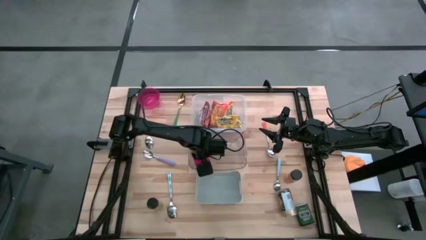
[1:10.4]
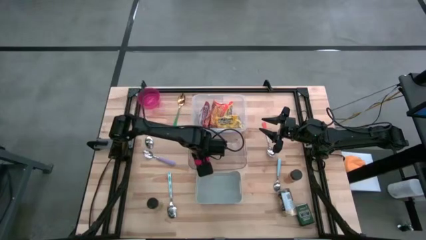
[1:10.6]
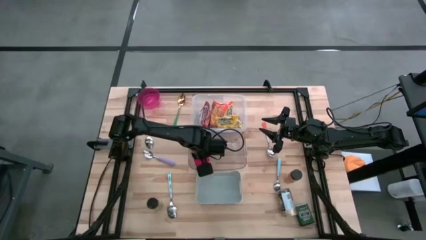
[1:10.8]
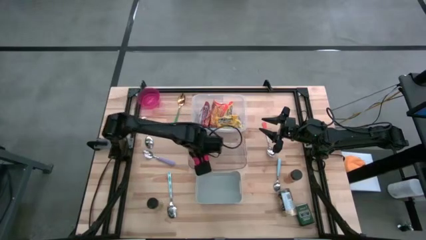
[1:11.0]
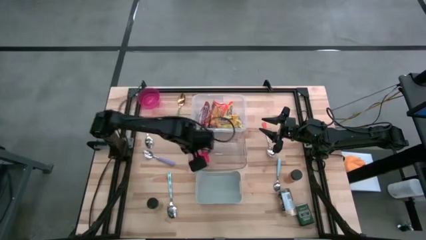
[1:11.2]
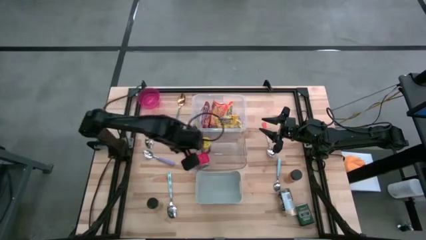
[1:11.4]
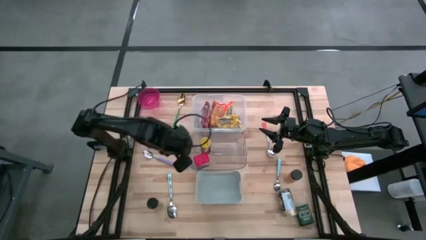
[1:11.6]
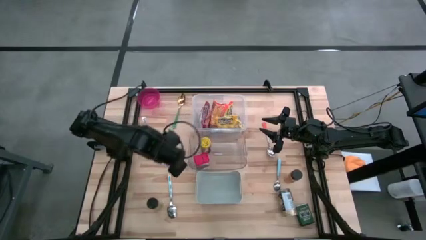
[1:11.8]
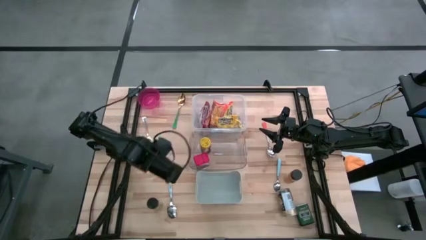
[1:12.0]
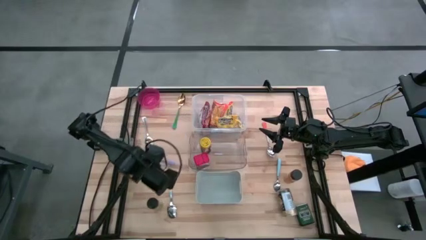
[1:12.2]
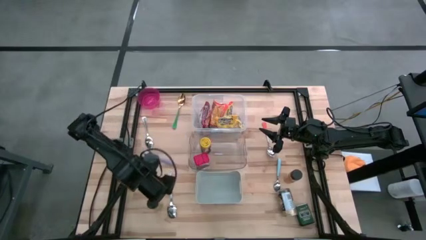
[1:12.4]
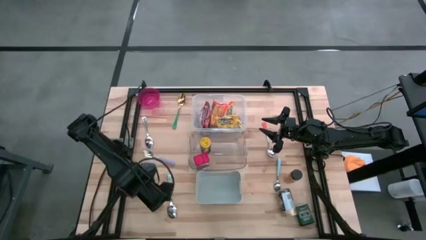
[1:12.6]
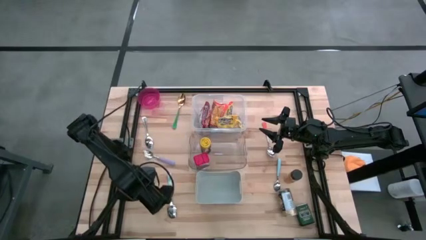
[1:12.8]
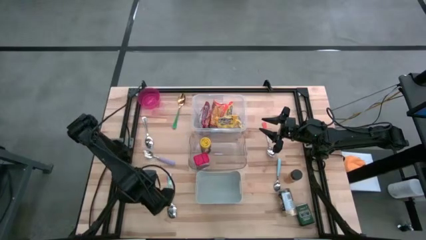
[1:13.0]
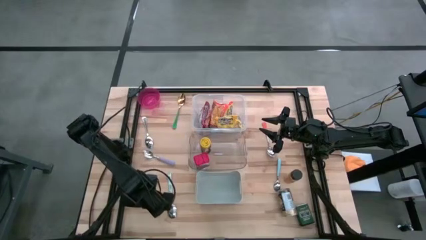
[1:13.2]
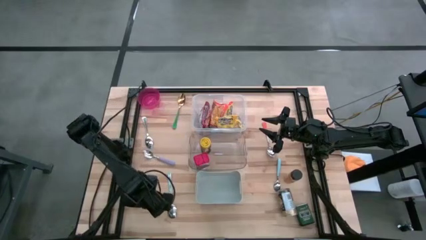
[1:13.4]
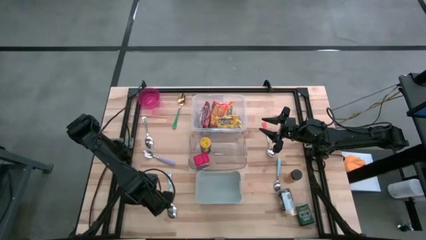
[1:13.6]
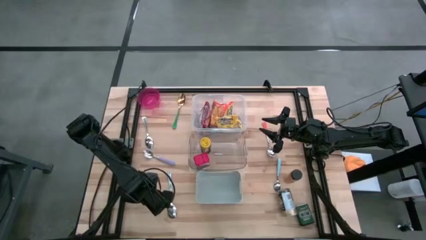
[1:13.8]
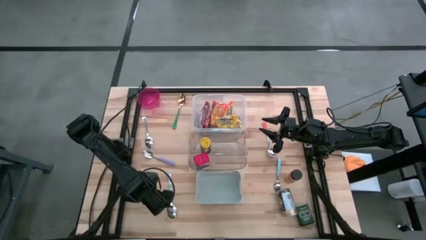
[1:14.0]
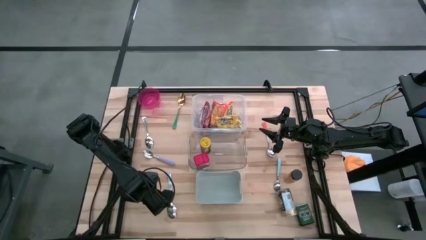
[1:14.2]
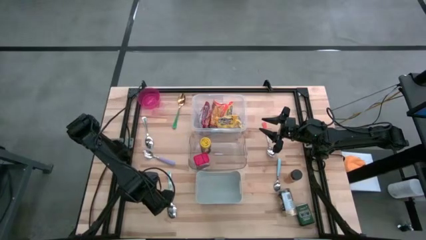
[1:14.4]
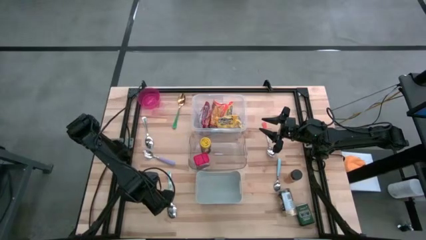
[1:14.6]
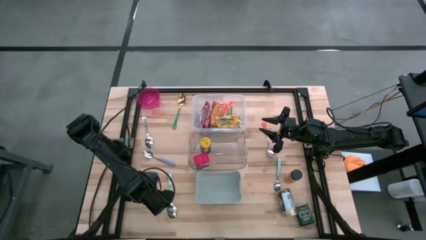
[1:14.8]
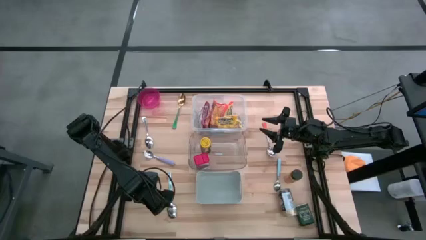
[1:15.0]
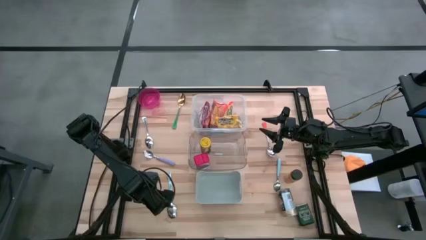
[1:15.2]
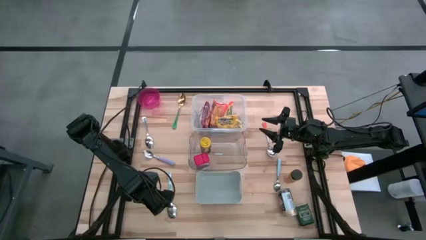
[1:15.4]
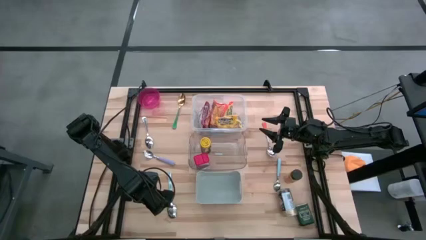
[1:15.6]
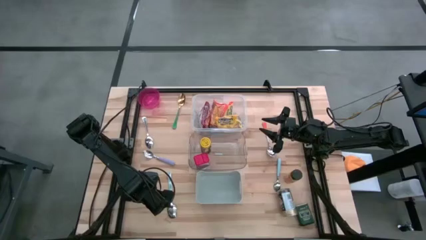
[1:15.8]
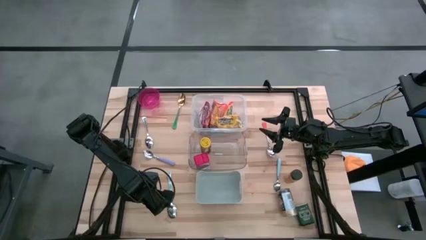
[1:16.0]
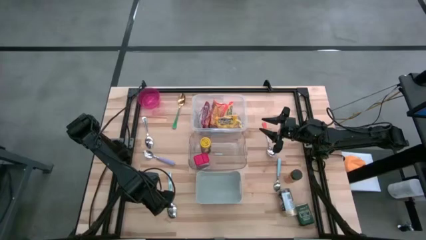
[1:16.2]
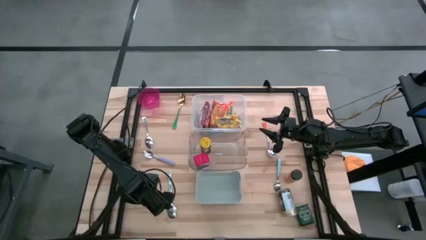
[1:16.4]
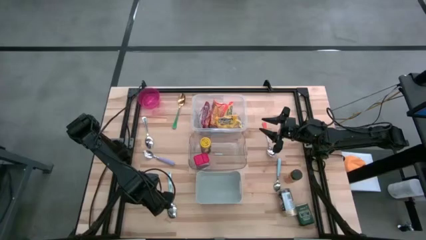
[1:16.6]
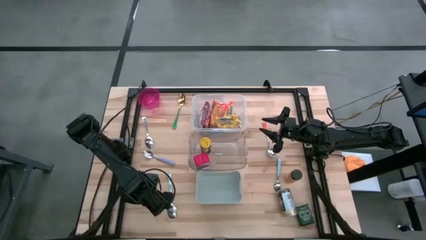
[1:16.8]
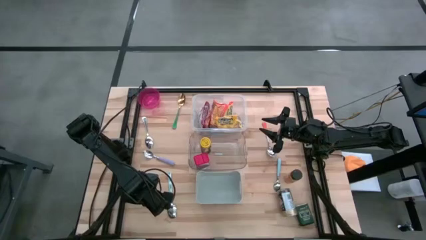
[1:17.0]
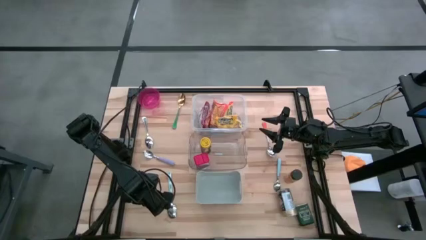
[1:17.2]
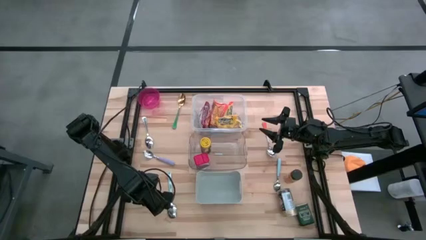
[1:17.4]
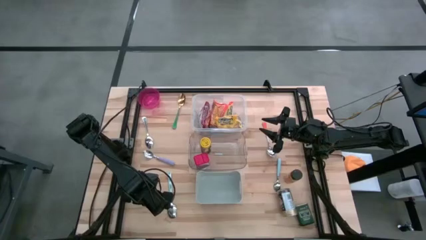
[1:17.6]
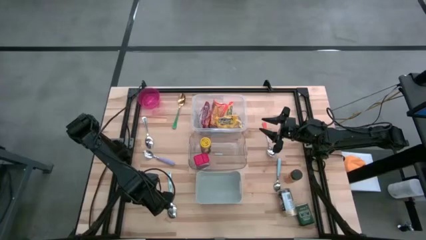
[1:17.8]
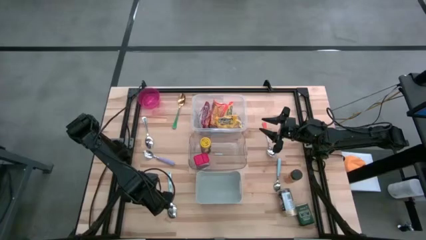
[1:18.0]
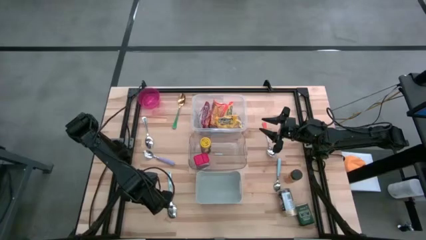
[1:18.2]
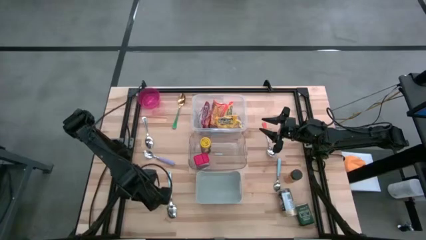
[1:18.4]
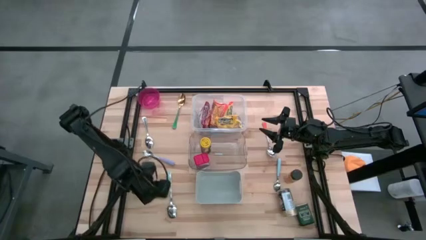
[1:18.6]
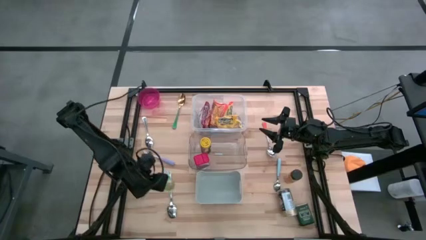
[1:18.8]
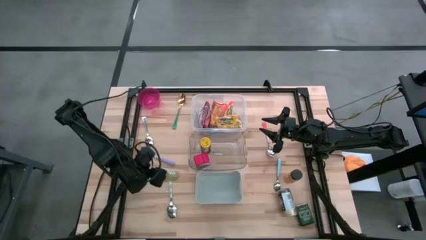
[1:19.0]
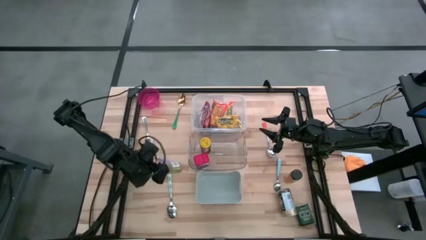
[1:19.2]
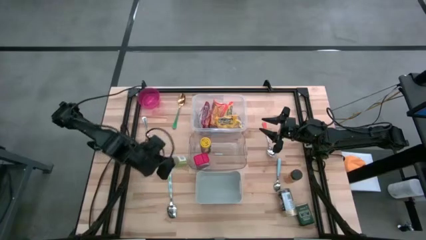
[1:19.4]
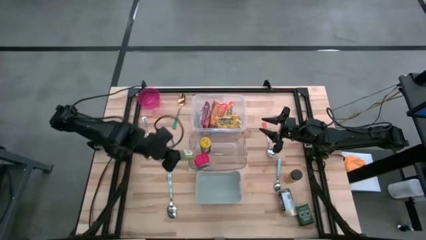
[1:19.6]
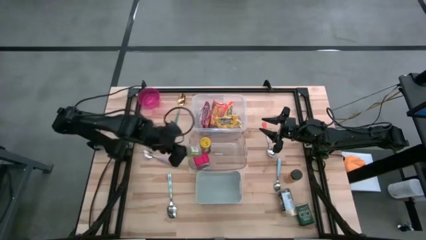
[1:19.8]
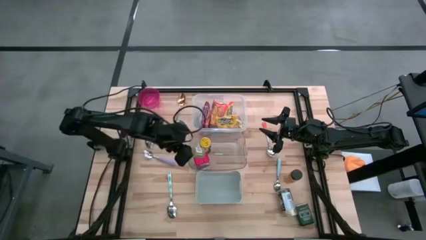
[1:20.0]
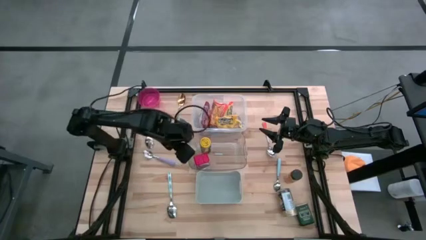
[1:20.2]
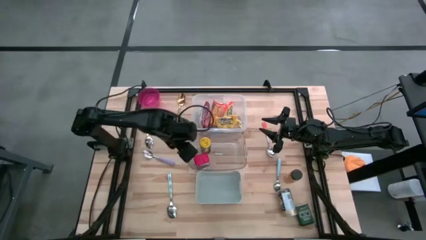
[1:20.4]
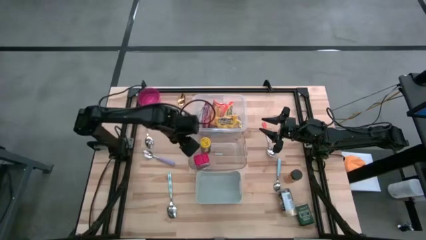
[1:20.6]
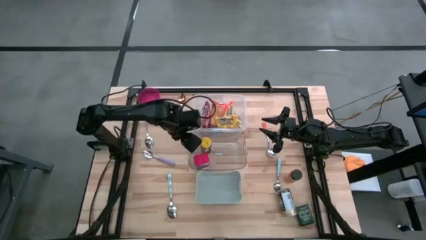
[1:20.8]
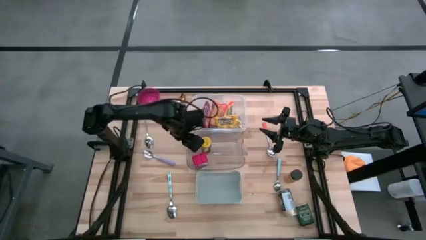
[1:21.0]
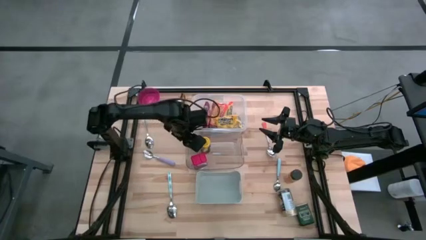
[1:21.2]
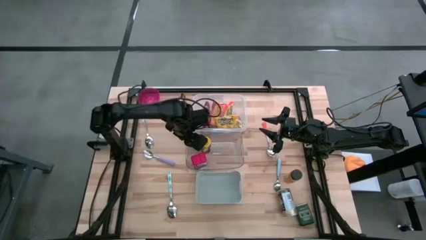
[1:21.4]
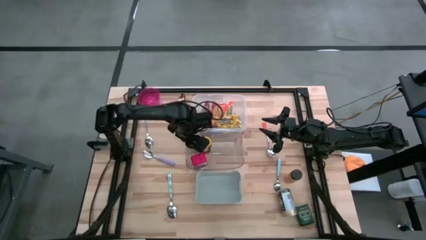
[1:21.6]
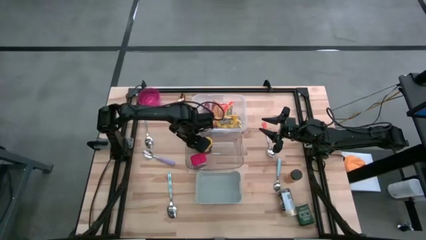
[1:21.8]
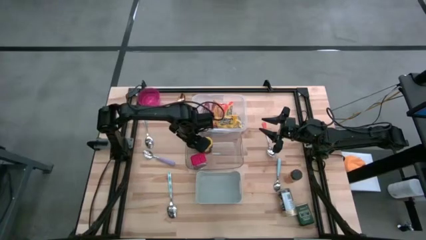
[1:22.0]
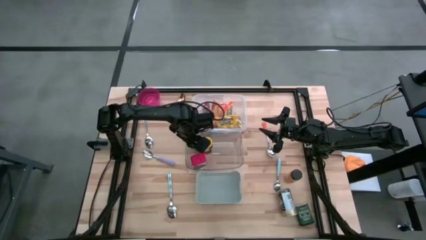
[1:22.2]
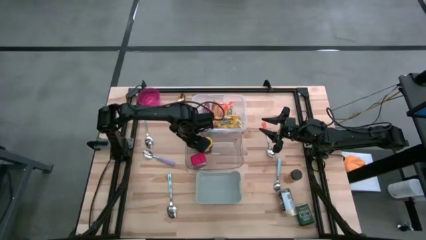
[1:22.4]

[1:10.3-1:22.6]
Put the green spice bottle into the transparent bin
